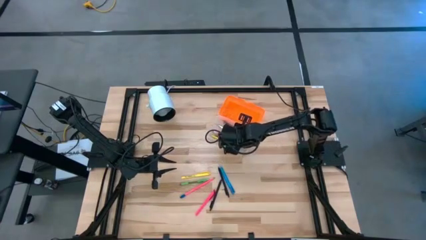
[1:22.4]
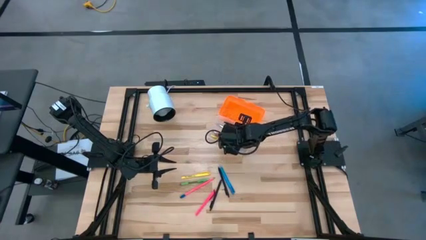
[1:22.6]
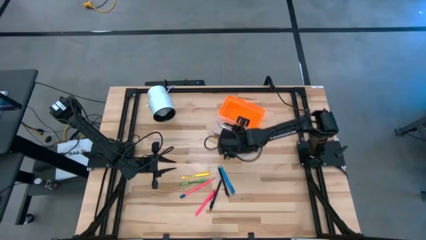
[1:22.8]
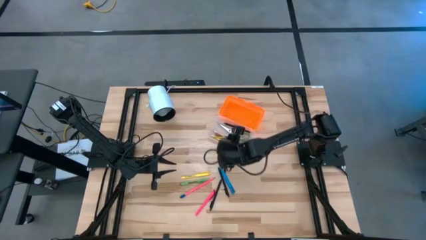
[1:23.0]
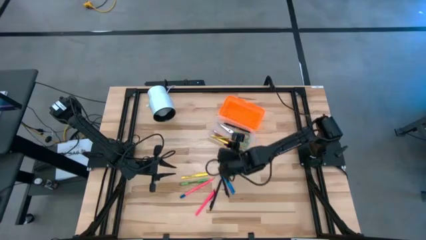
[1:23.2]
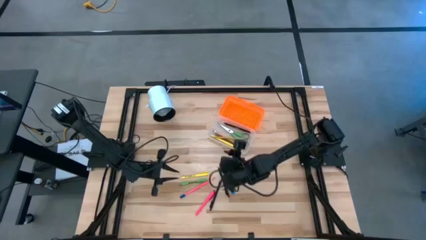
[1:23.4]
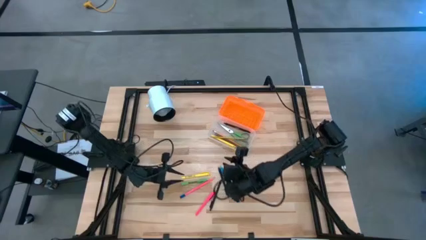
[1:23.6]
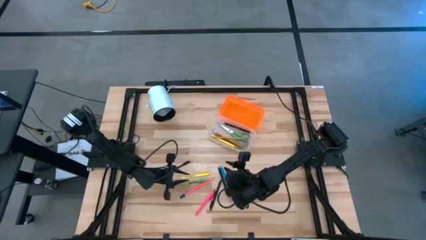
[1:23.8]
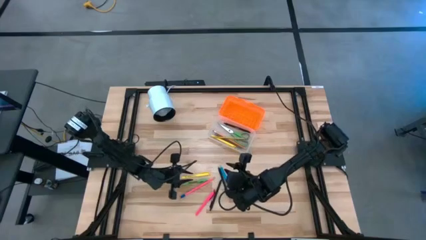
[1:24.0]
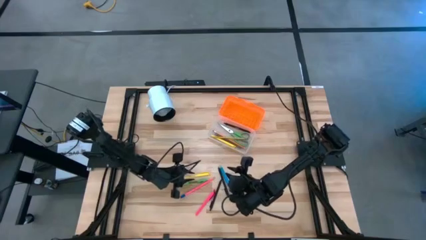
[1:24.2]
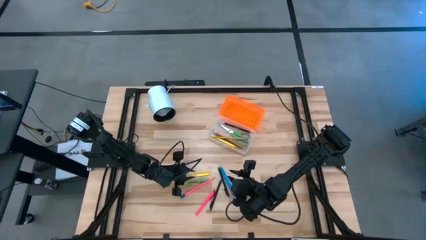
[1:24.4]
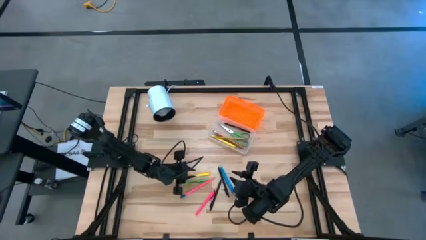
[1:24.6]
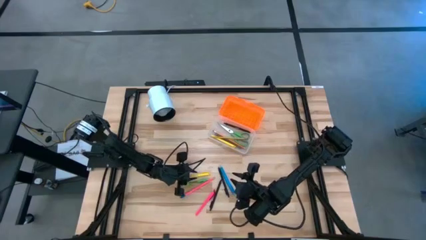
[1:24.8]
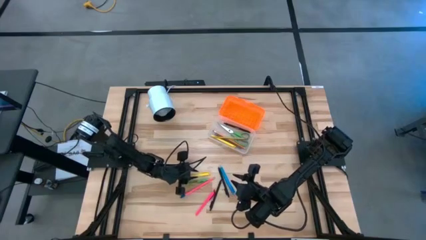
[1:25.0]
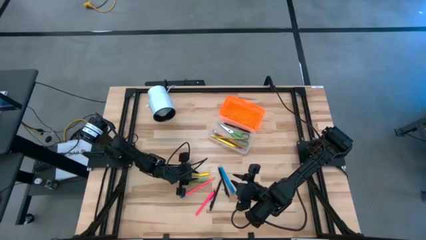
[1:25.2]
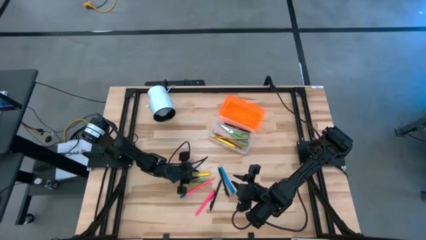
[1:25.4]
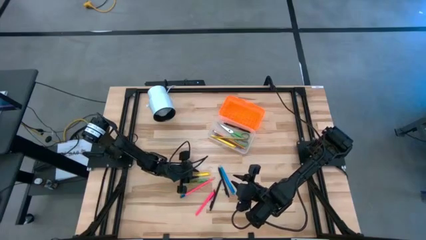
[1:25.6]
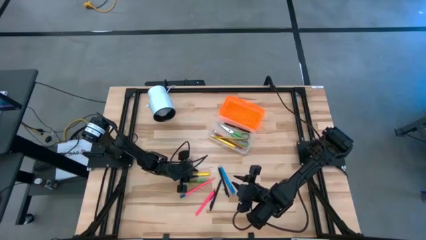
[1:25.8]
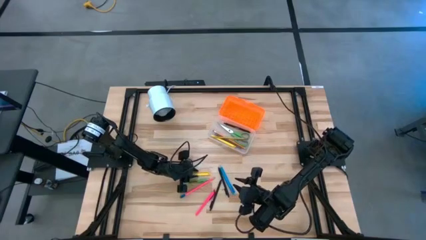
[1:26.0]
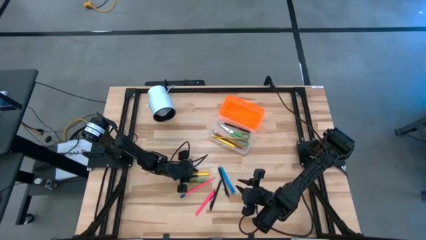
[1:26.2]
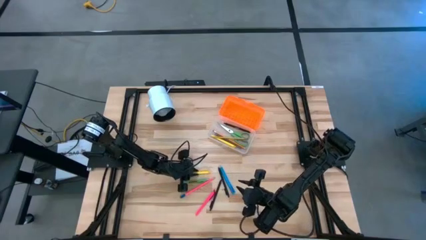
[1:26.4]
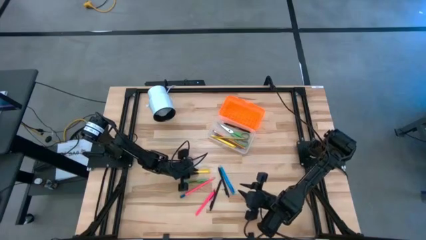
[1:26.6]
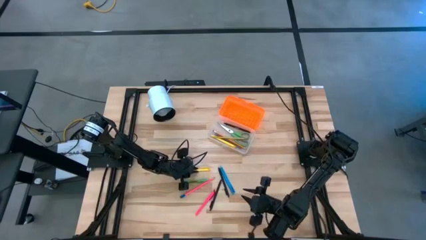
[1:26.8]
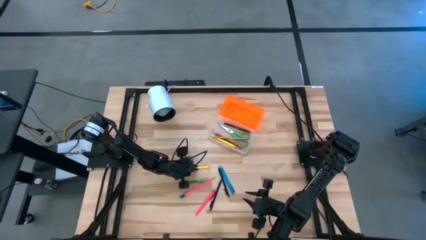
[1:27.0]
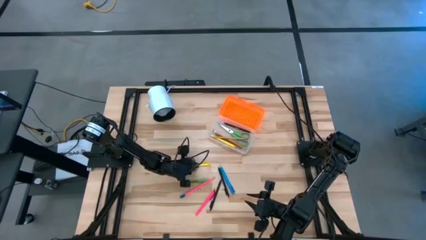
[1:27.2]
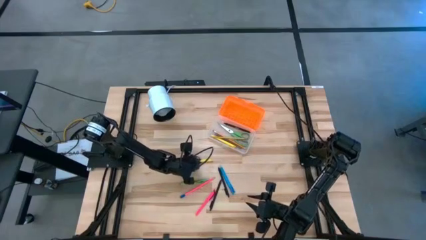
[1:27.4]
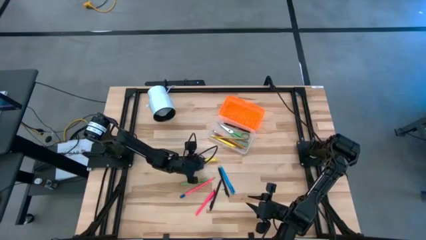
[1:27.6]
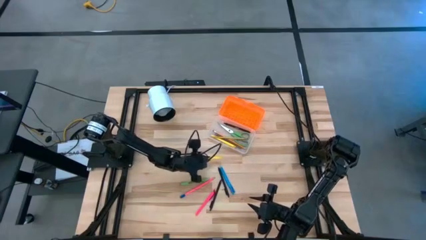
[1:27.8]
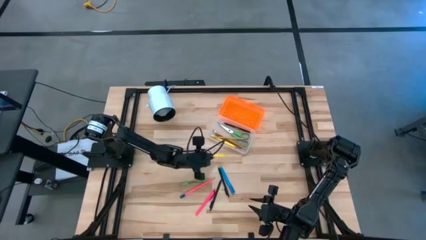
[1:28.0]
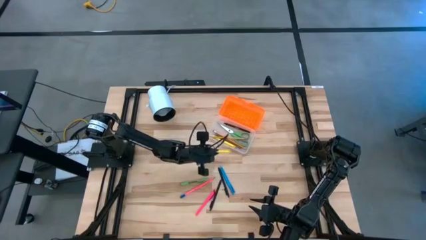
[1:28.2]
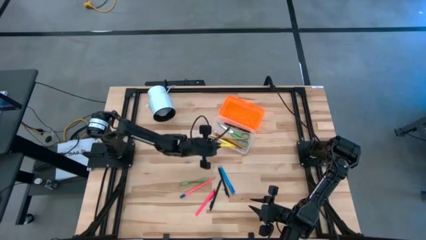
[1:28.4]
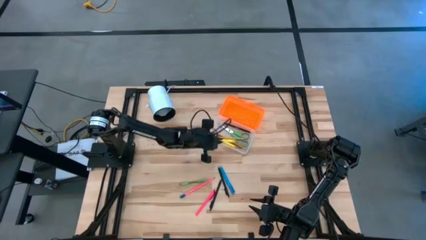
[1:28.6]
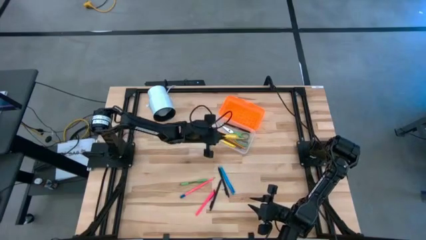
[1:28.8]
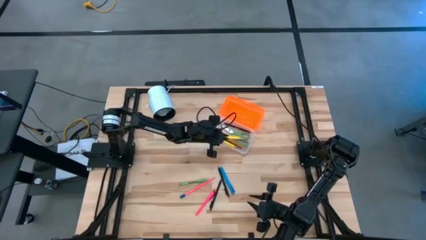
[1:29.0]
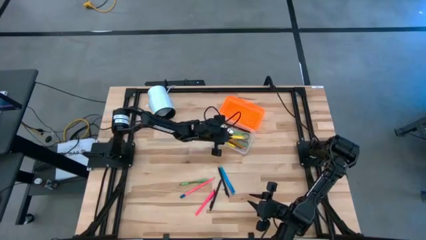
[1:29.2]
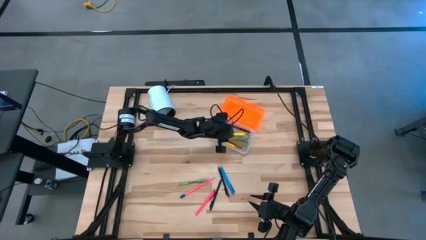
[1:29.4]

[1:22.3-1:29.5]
Task: Pick & place school supplies into a supply box
Put the yellow pen into the supply box

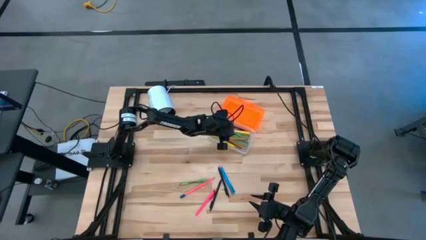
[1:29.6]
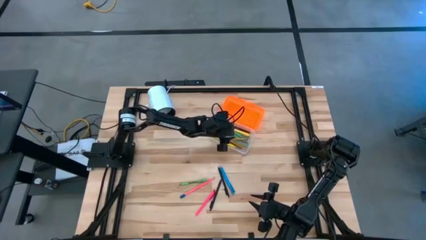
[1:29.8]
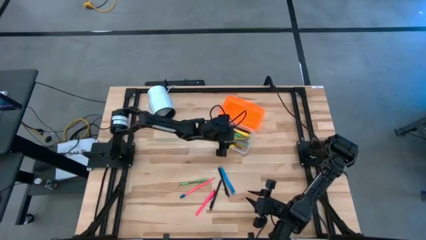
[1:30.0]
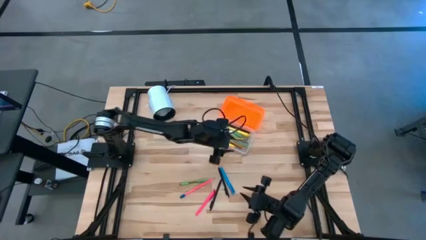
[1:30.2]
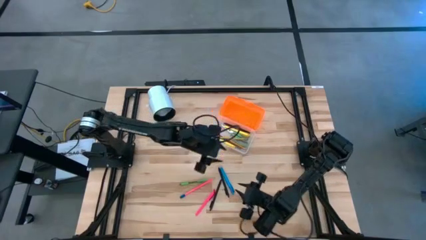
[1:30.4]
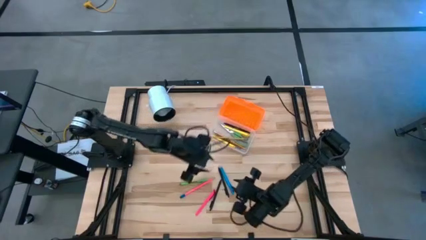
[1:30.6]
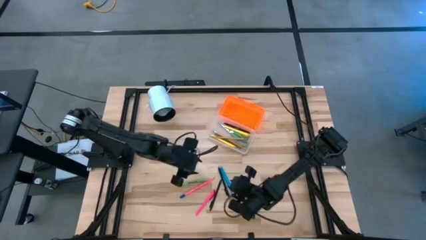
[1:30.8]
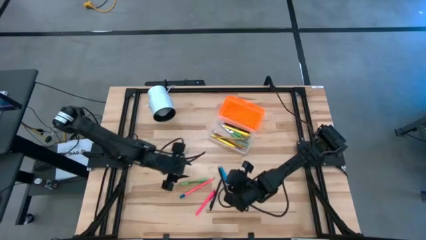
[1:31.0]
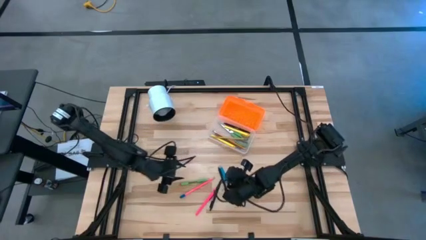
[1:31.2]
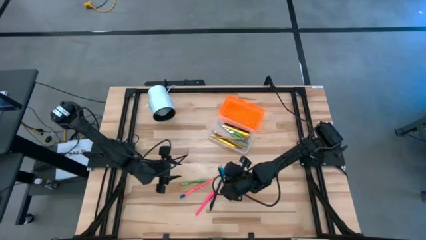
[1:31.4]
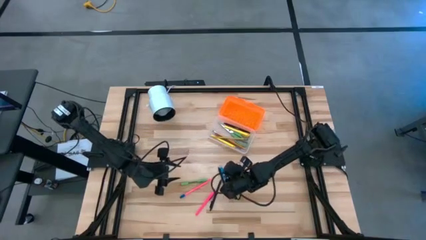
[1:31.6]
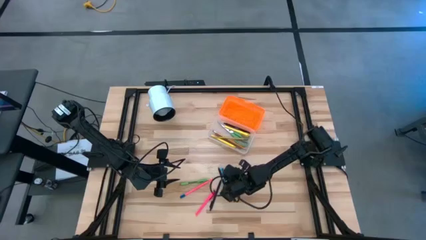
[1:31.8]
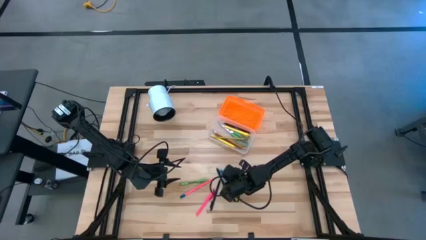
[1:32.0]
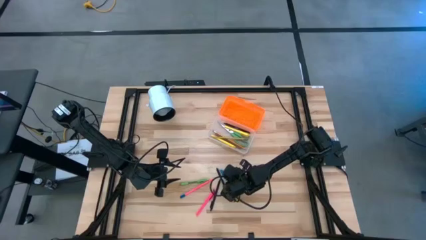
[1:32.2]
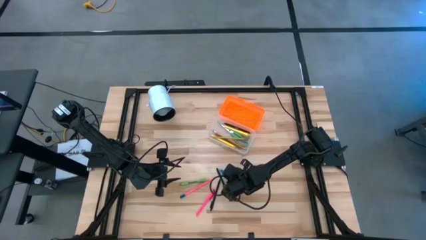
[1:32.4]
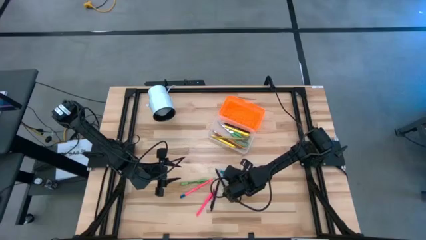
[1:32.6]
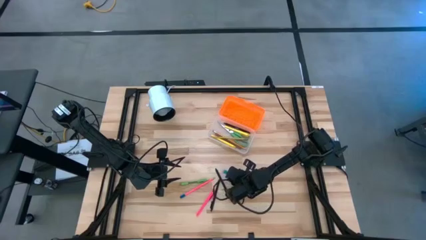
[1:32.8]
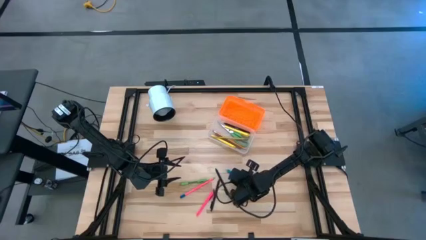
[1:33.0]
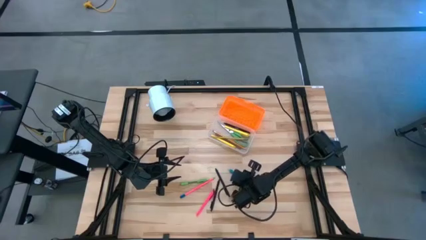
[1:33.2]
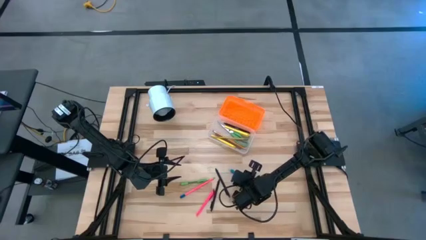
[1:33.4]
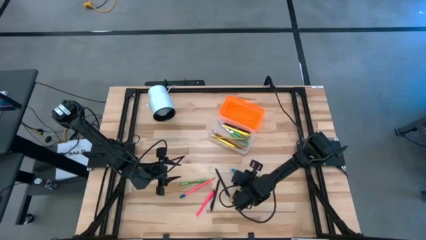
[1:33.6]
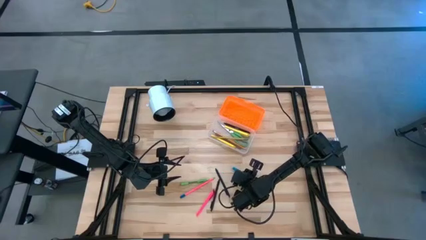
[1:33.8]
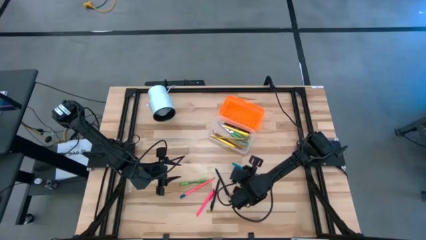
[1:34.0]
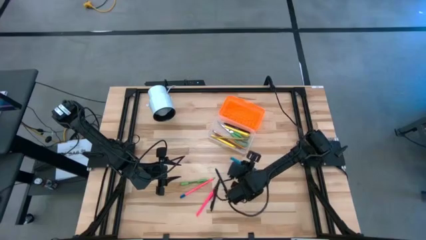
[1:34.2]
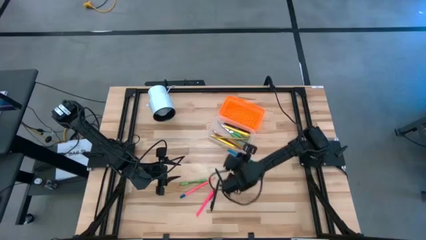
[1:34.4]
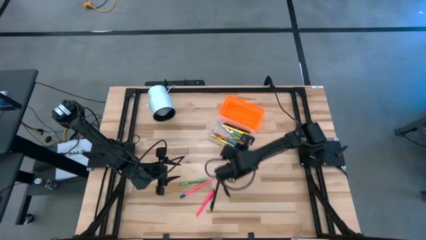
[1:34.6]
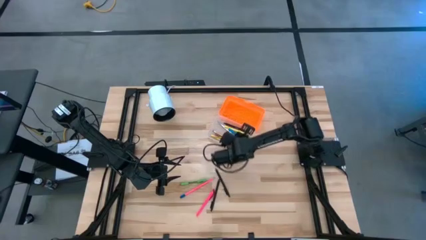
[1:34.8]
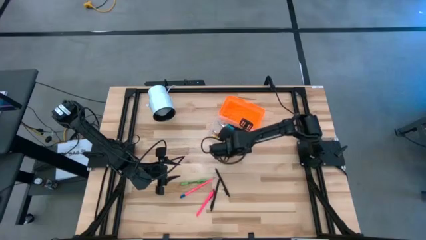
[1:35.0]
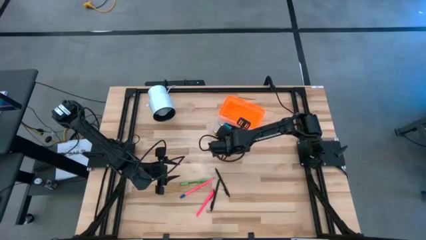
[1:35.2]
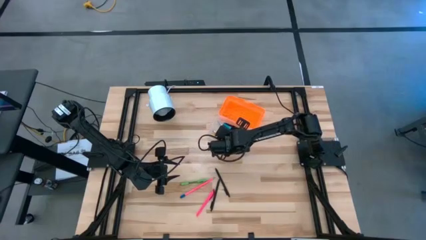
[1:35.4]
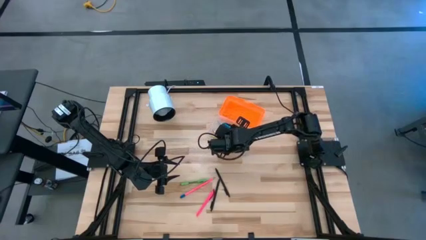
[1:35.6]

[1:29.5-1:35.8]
Put the blue pen into the supply box
